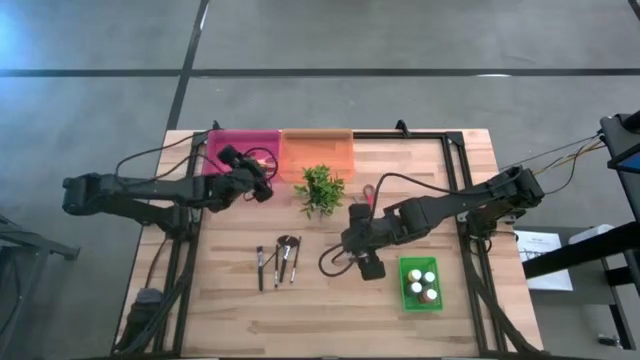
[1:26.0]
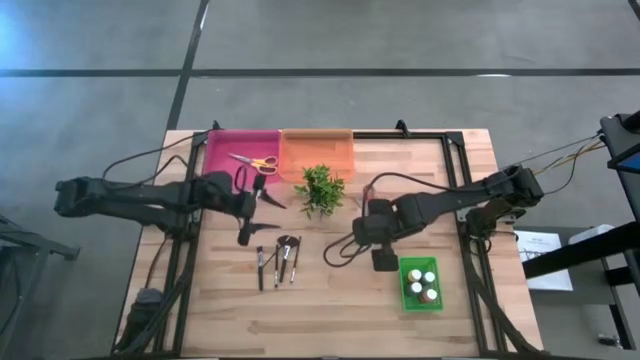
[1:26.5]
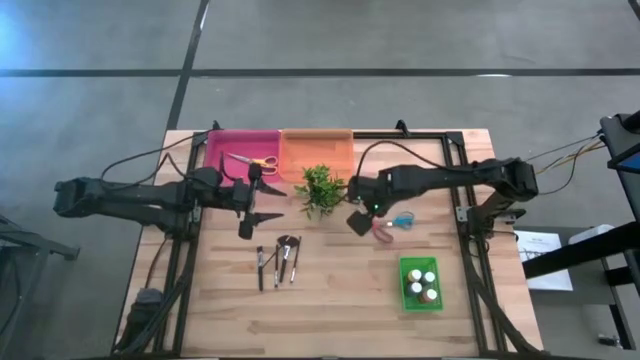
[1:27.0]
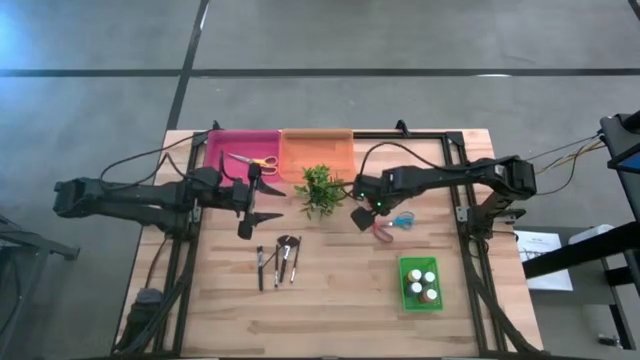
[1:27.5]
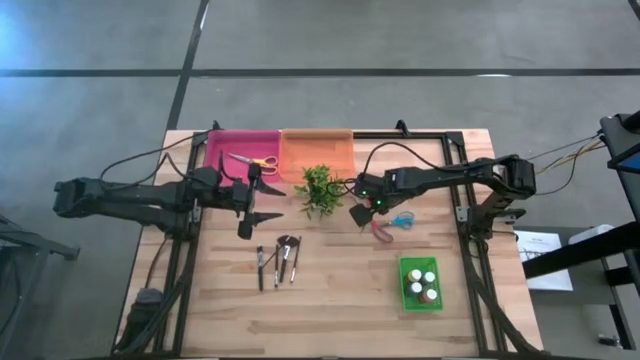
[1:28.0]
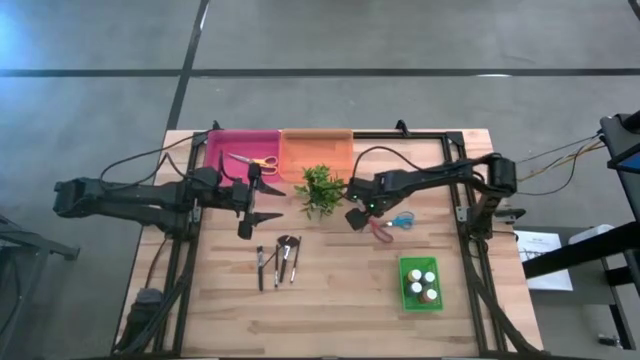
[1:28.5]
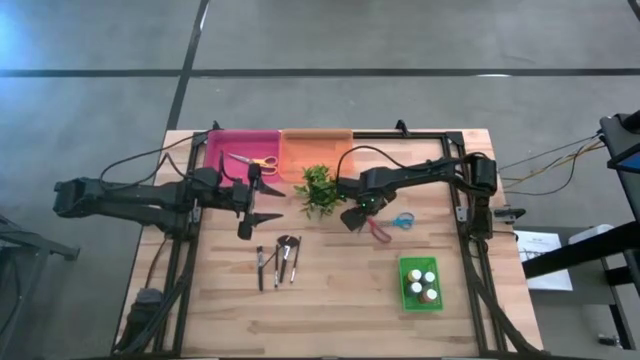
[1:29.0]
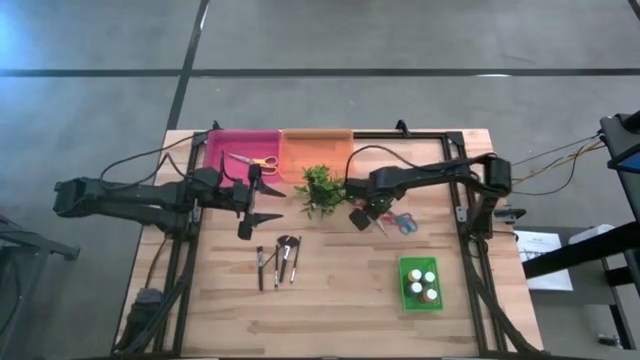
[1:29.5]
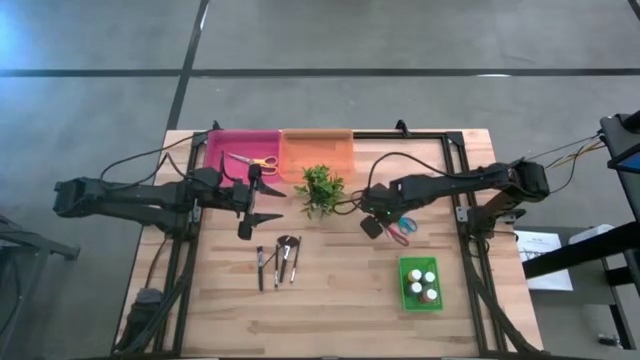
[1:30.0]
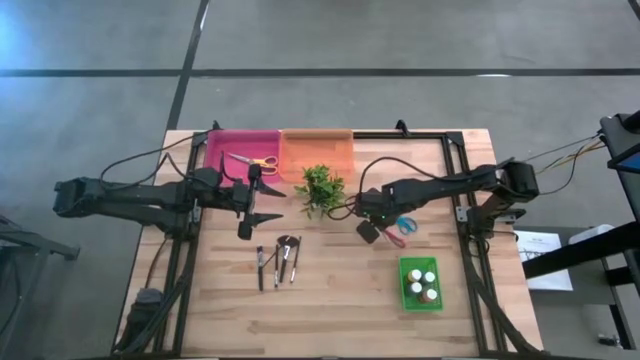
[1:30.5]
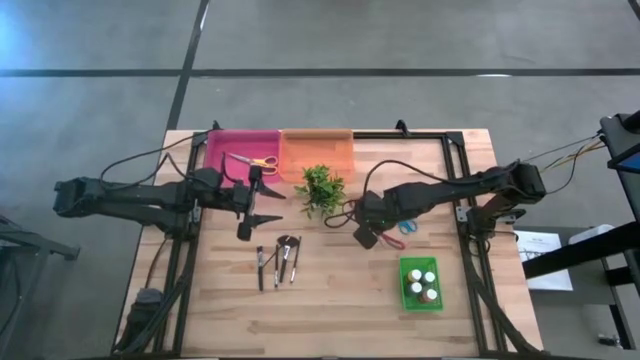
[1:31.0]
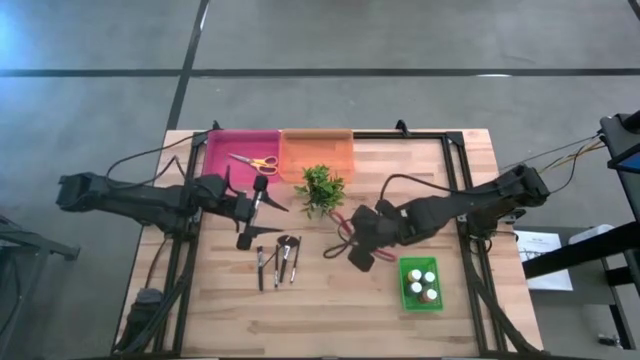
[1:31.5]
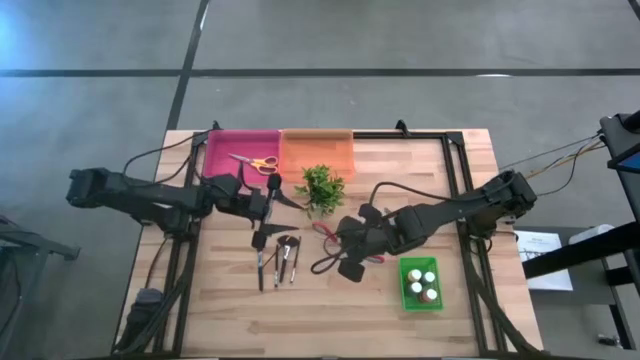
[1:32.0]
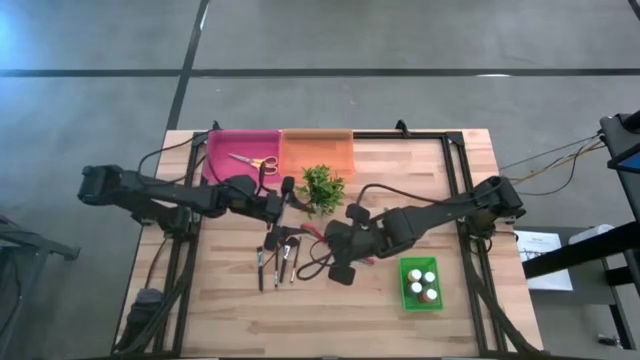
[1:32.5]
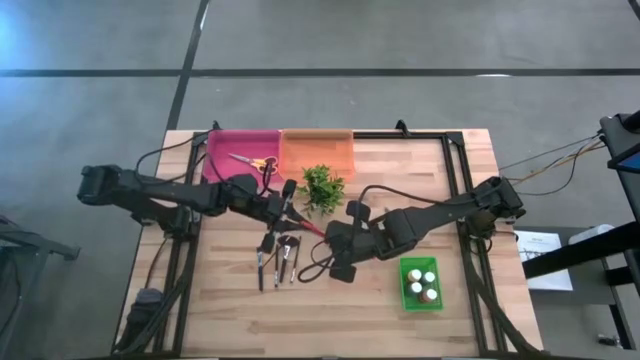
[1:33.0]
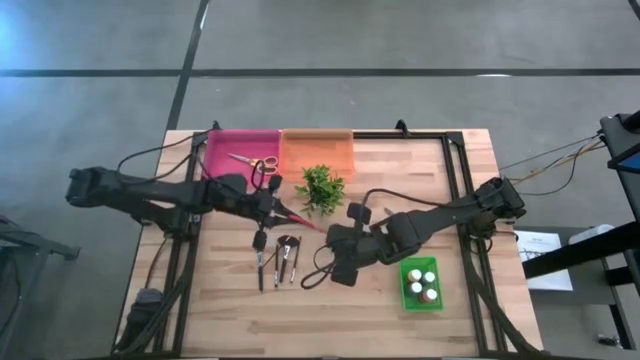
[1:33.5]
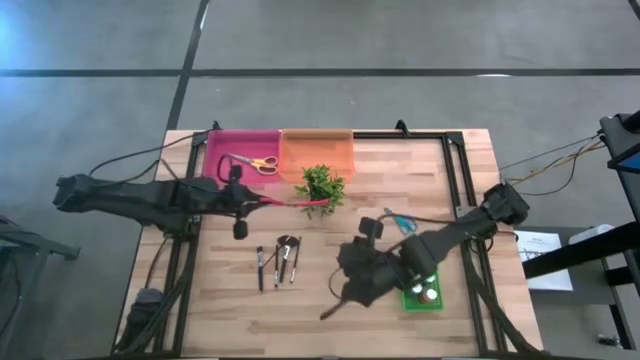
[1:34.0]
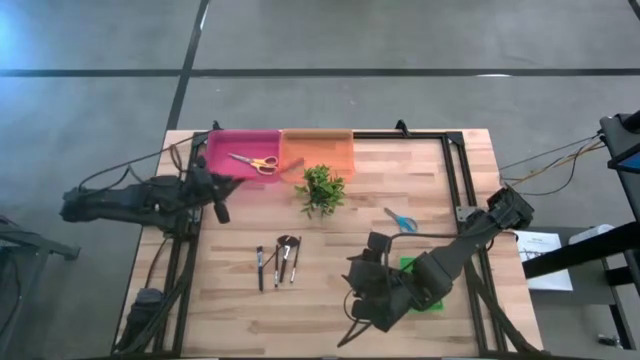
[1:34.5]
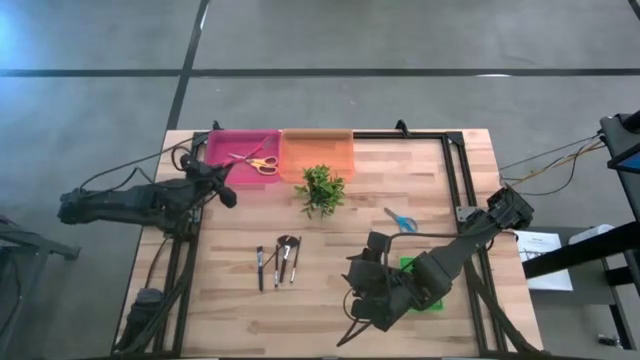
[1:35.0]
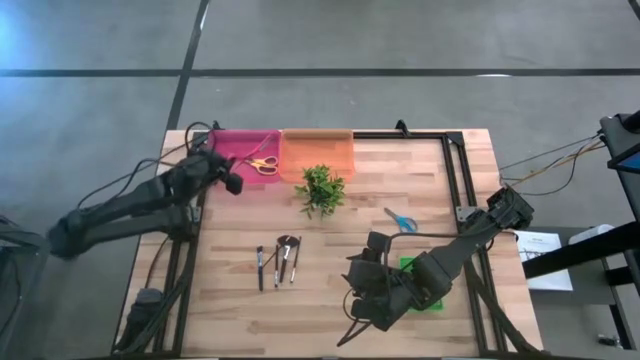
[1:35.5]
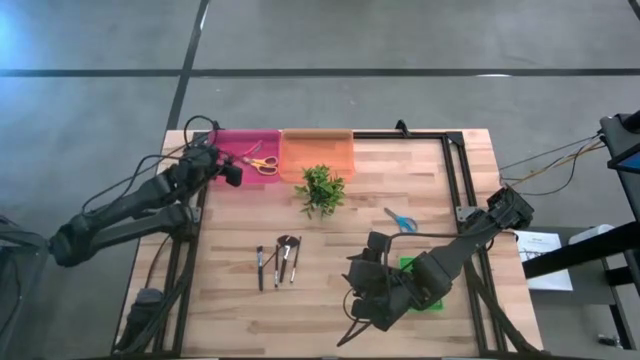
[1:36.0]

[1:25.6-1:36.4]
Task: Pick & Place Paint Supplies
Put the red scissors into the pink bin

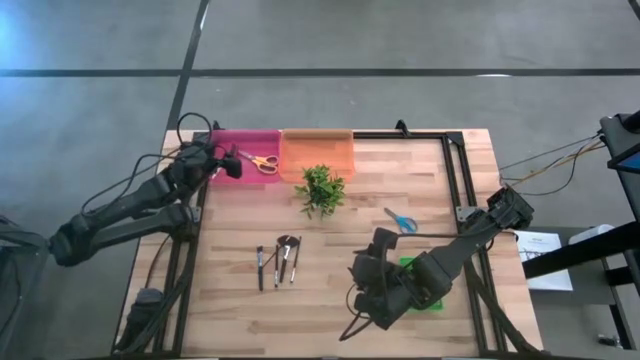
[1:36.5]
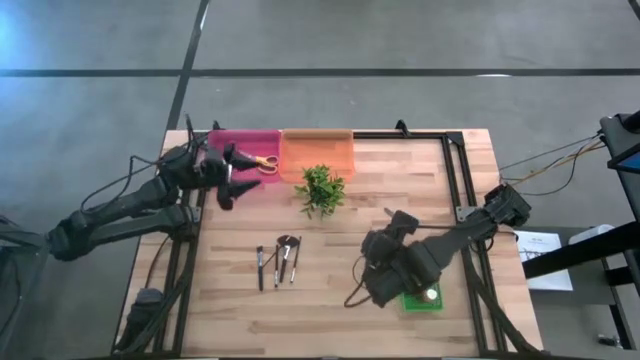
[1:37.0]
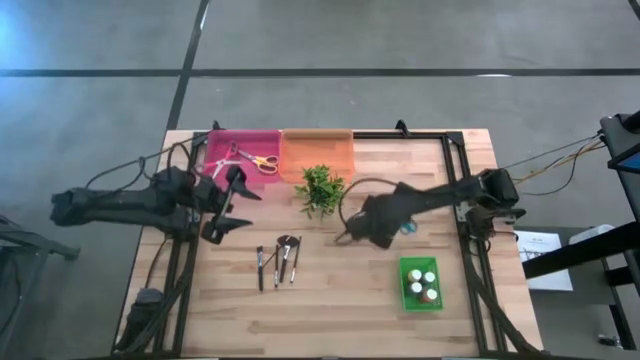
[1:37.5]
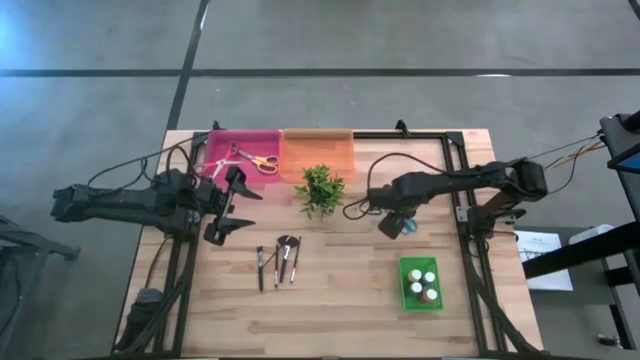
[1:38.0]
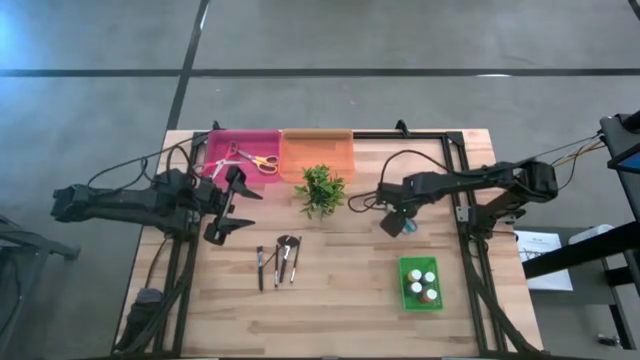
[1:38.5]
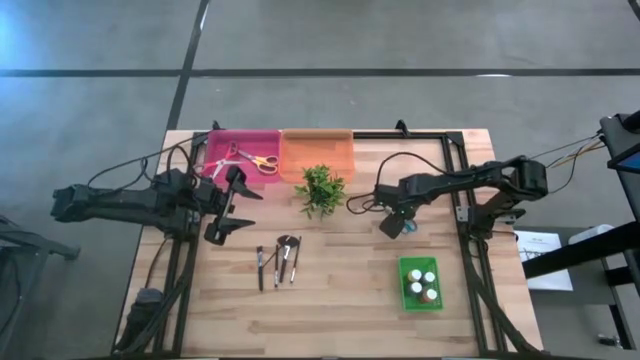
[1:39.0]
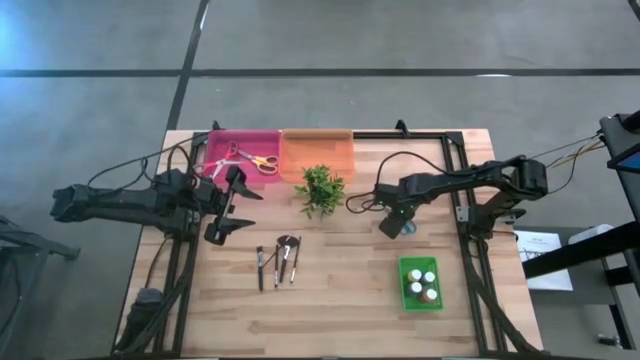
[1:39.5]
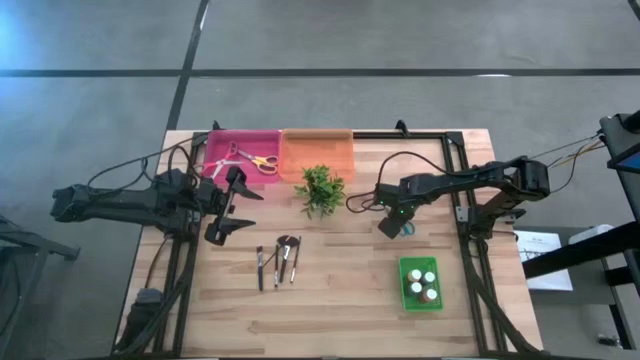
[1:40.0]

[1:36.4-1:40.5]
Put the blue scissors into the pink bin

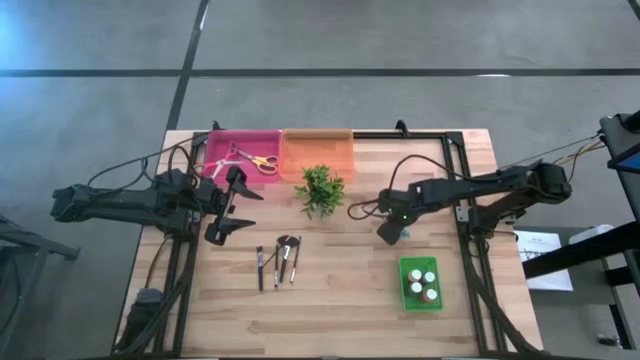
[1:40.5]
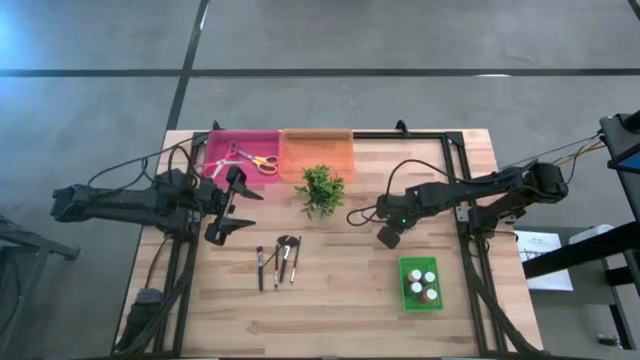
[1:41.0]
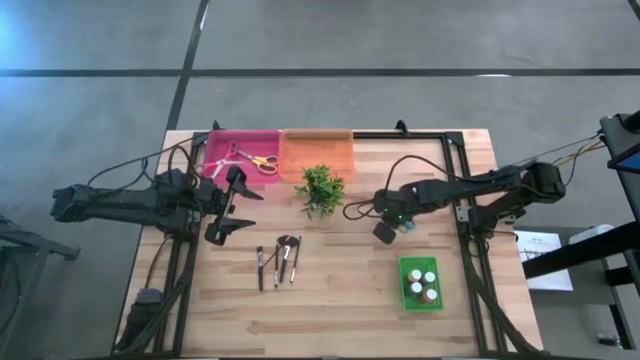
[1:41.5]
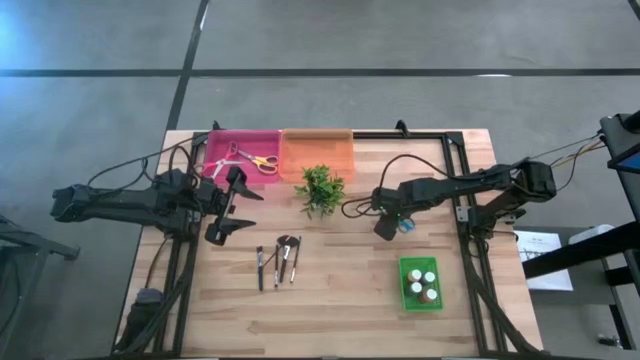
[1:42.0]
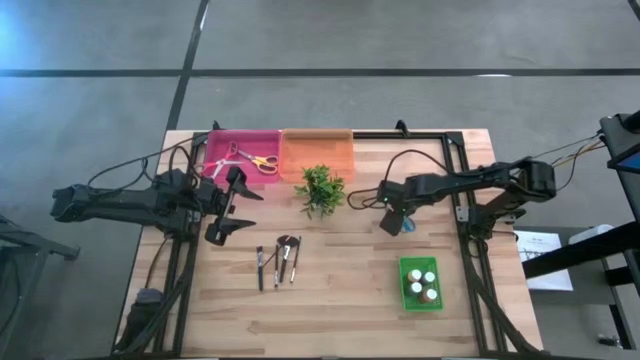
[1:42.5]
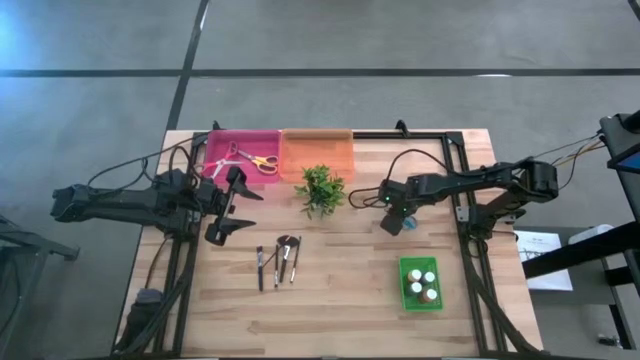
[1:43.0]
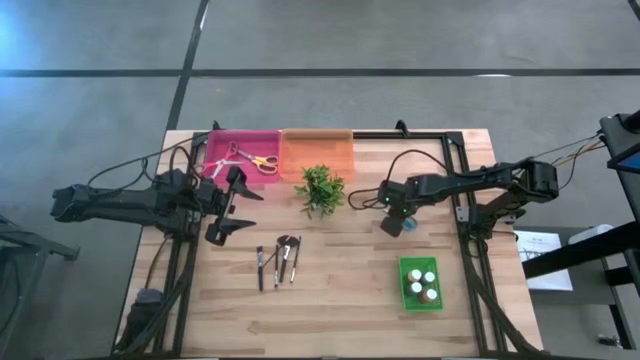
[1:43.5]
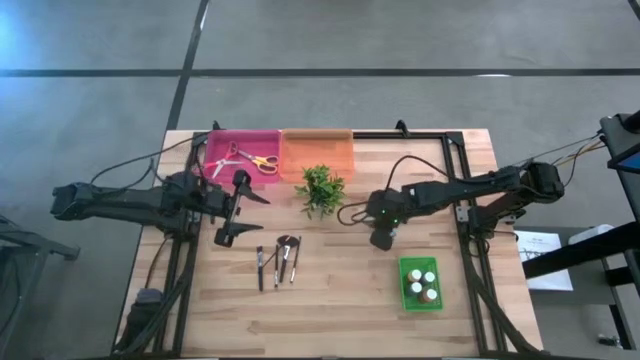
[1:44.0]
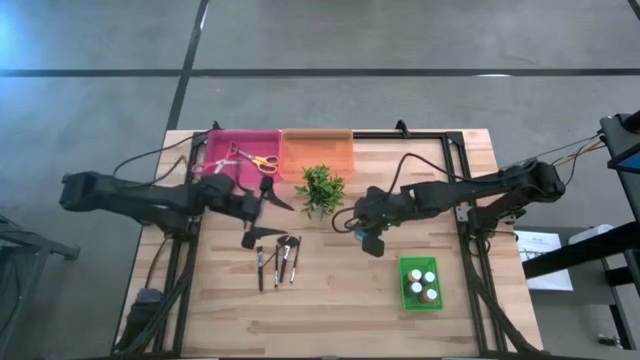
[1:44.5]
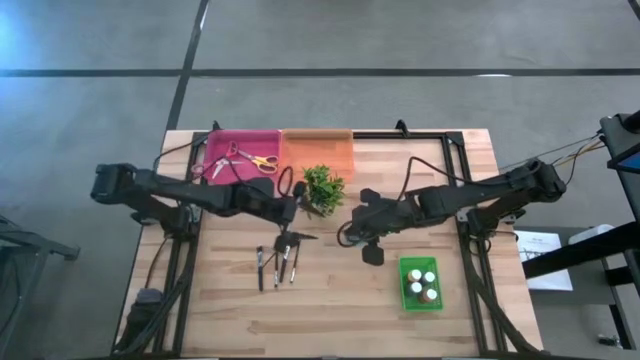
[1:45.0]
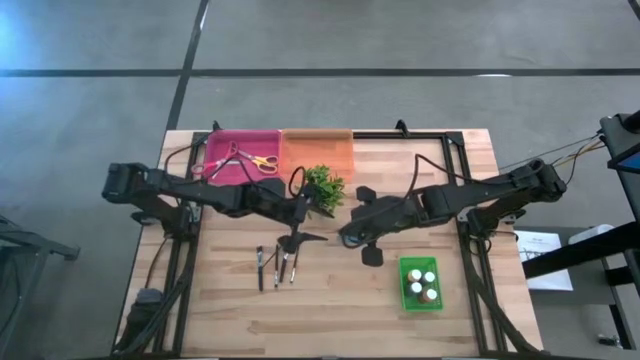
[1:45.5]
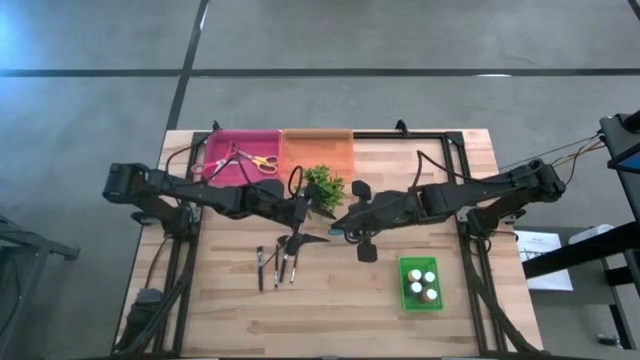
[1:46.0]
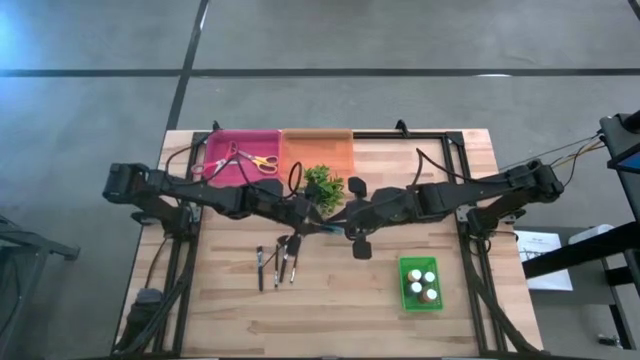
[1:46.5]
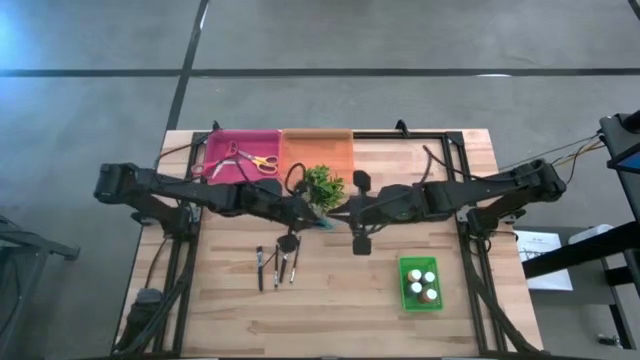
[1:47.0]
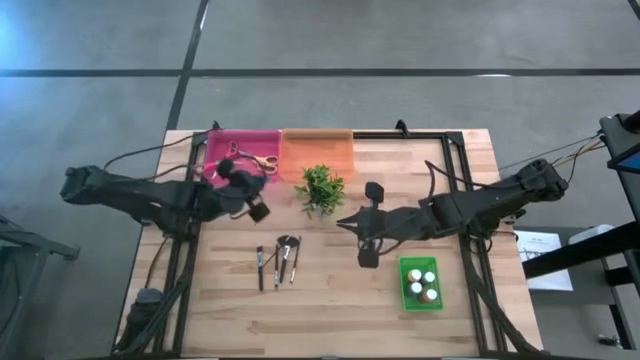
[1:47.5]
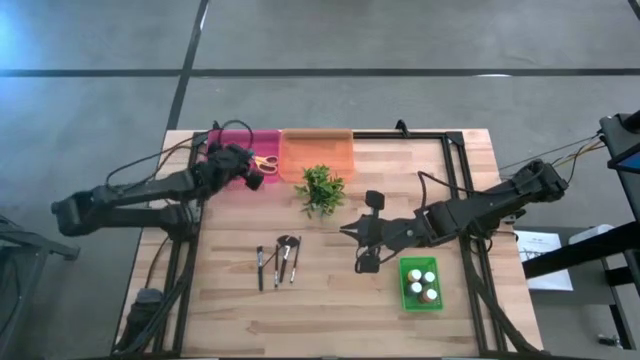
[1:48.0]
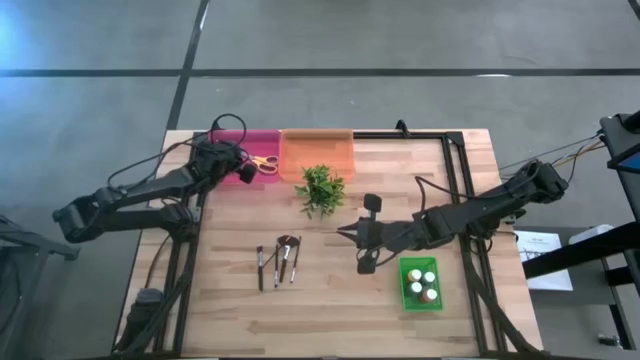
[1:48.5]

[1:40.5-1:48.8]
Put the blue scissors into the pink bin
